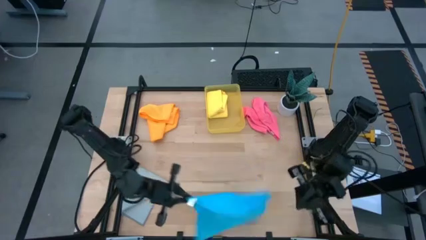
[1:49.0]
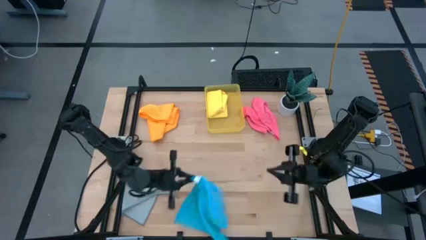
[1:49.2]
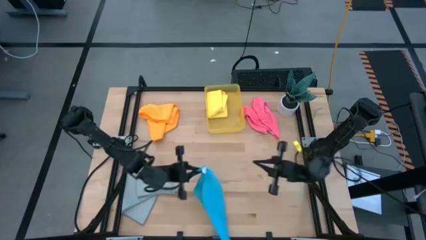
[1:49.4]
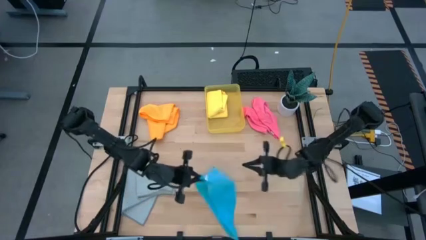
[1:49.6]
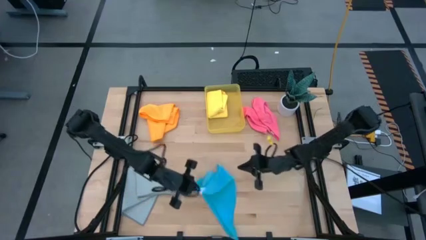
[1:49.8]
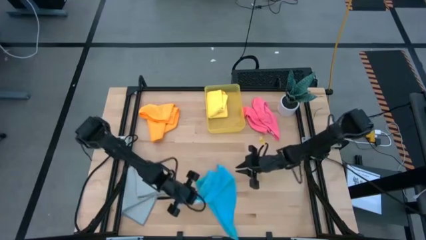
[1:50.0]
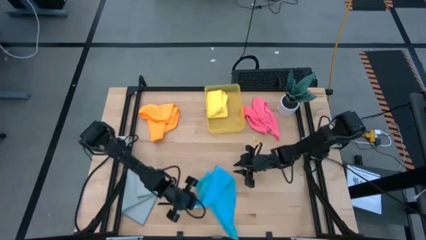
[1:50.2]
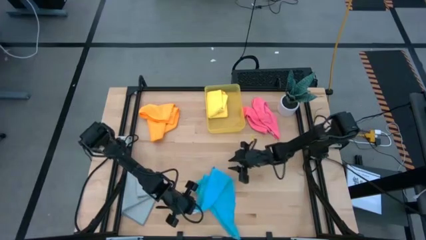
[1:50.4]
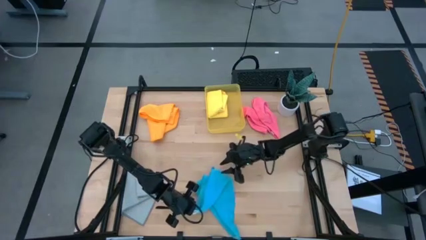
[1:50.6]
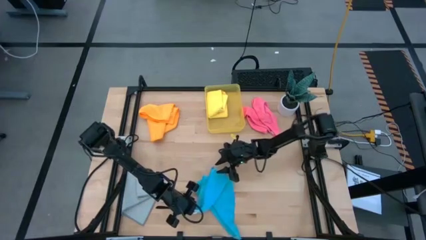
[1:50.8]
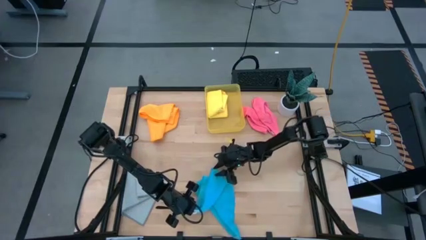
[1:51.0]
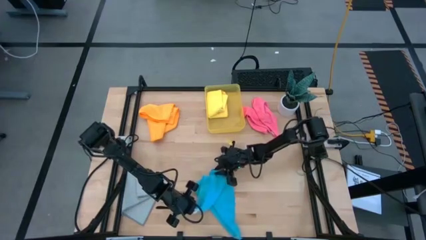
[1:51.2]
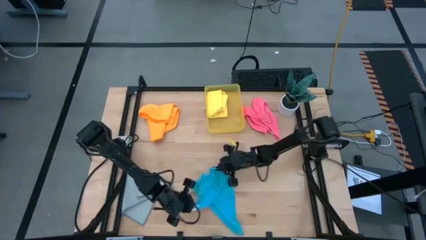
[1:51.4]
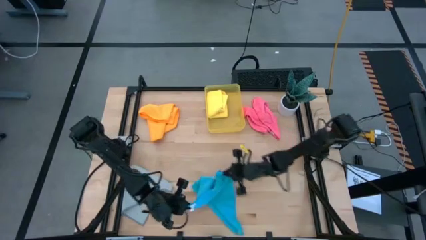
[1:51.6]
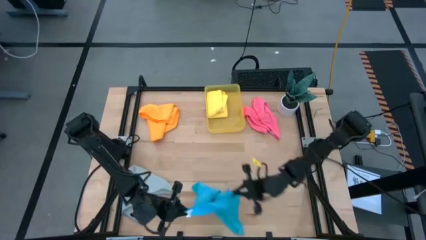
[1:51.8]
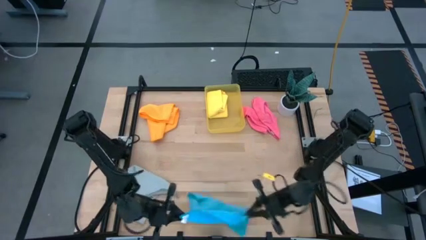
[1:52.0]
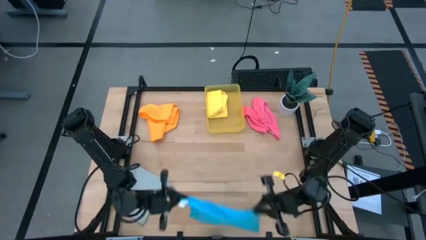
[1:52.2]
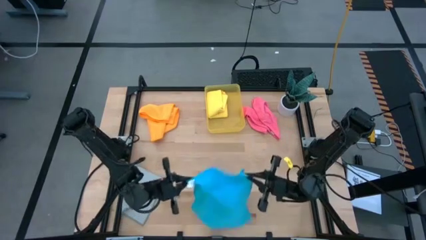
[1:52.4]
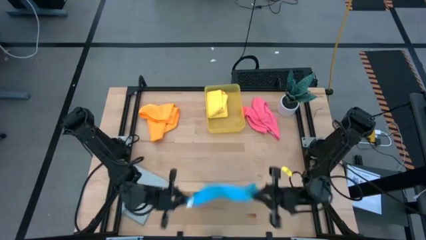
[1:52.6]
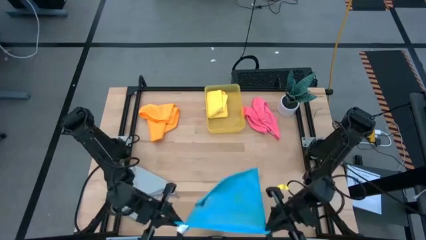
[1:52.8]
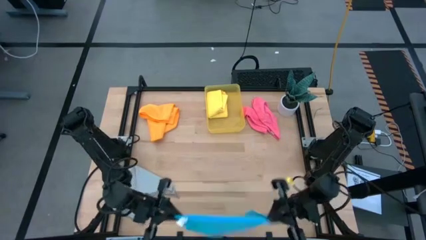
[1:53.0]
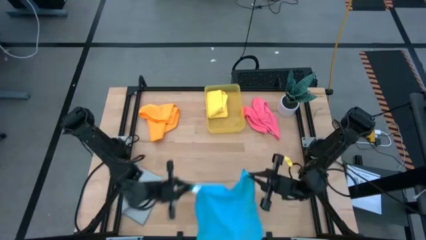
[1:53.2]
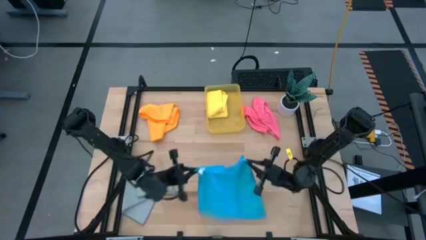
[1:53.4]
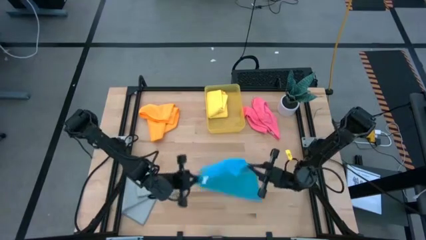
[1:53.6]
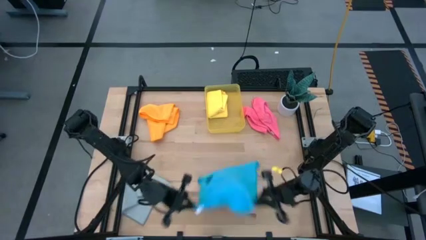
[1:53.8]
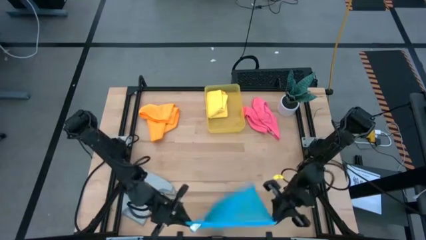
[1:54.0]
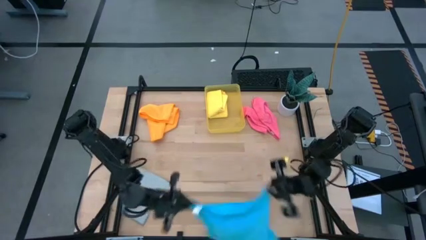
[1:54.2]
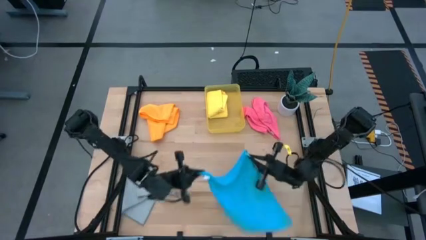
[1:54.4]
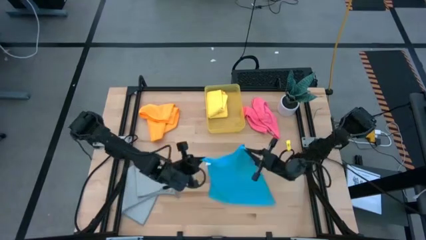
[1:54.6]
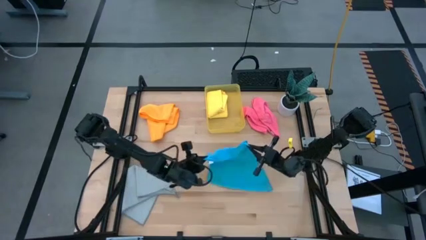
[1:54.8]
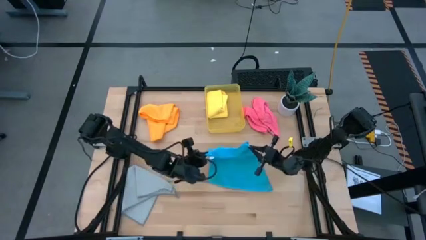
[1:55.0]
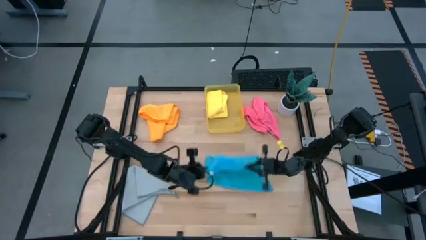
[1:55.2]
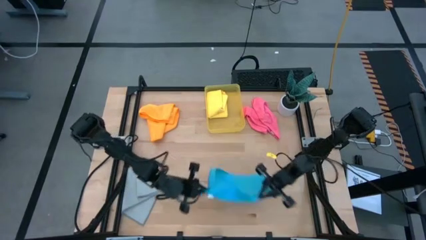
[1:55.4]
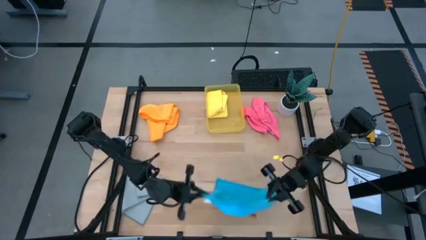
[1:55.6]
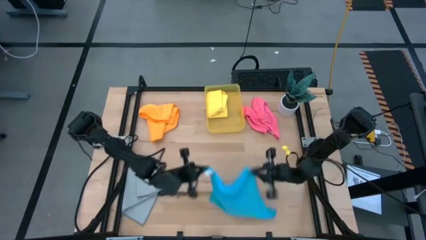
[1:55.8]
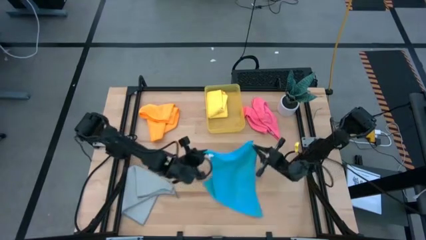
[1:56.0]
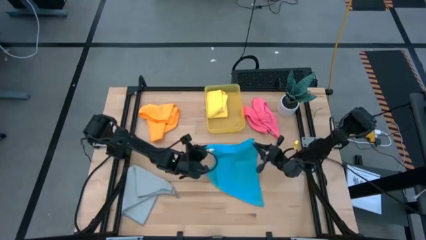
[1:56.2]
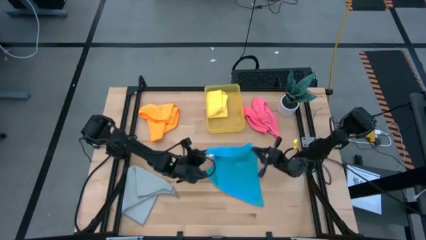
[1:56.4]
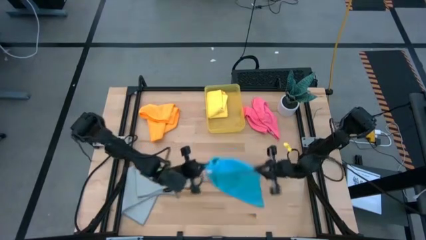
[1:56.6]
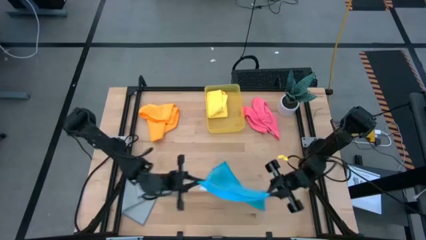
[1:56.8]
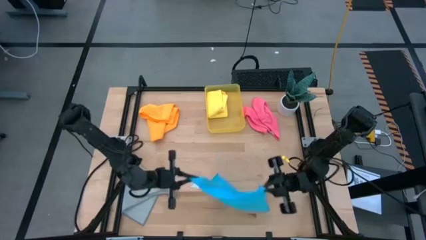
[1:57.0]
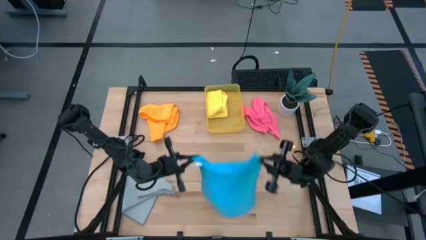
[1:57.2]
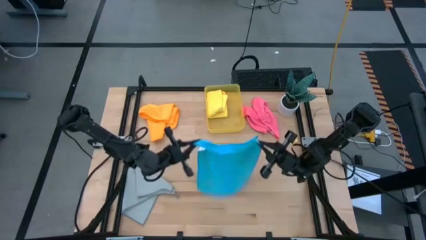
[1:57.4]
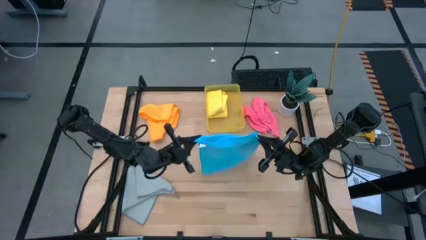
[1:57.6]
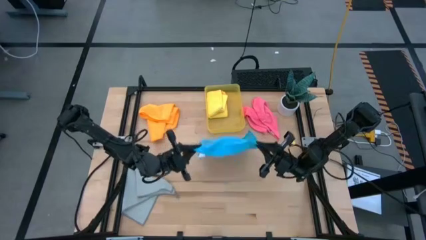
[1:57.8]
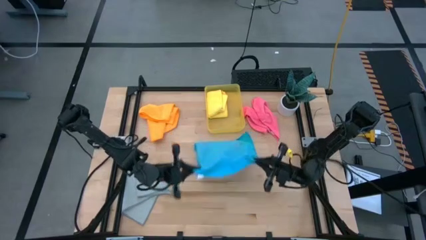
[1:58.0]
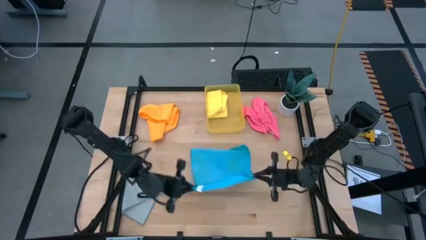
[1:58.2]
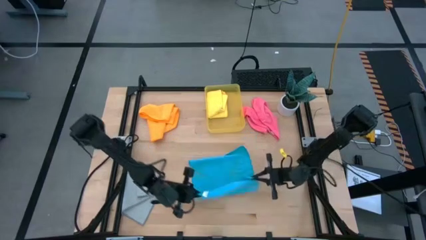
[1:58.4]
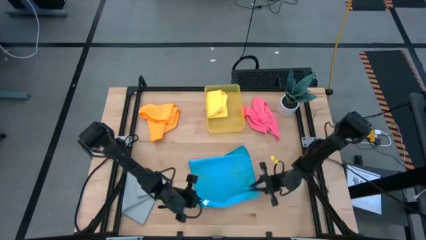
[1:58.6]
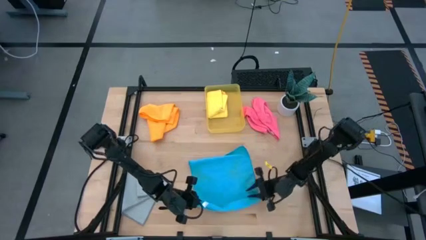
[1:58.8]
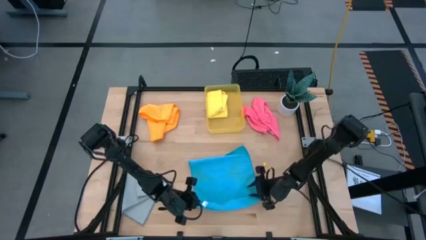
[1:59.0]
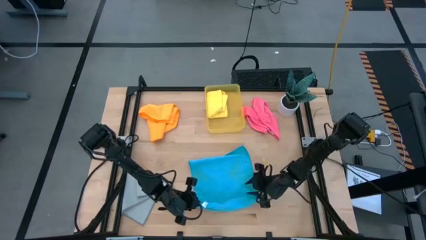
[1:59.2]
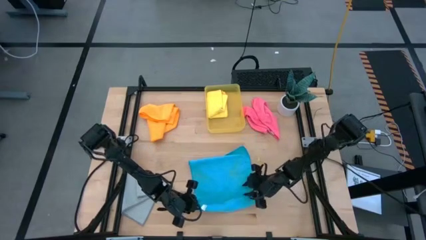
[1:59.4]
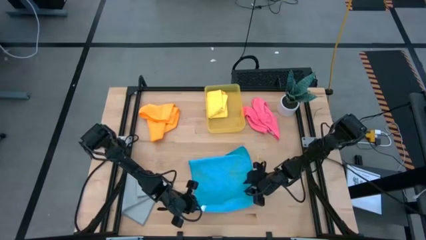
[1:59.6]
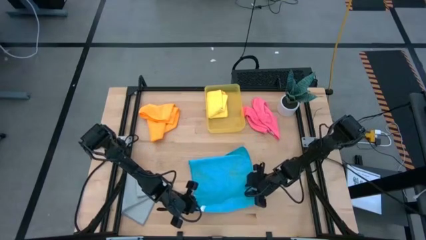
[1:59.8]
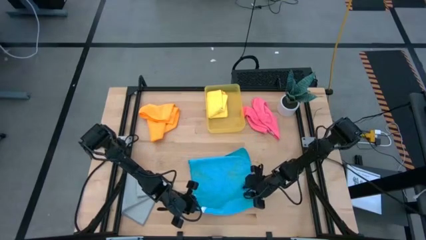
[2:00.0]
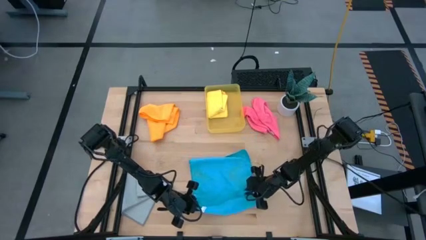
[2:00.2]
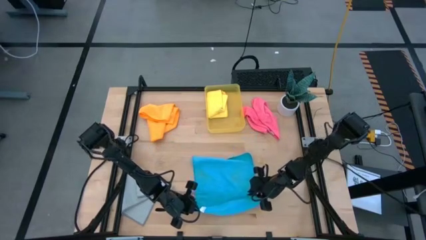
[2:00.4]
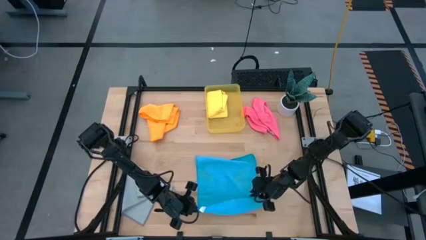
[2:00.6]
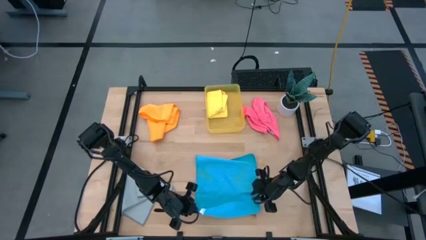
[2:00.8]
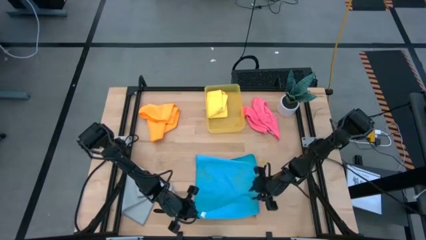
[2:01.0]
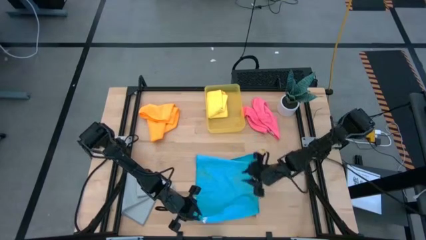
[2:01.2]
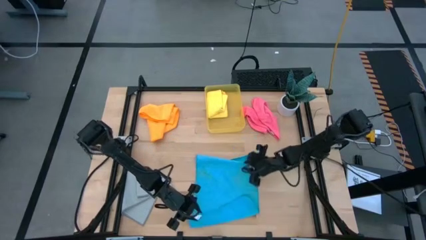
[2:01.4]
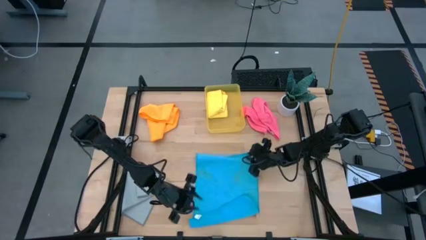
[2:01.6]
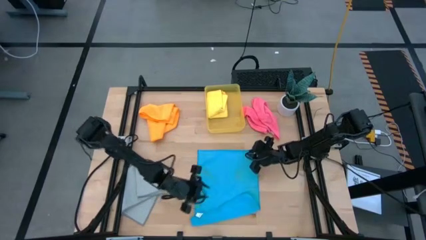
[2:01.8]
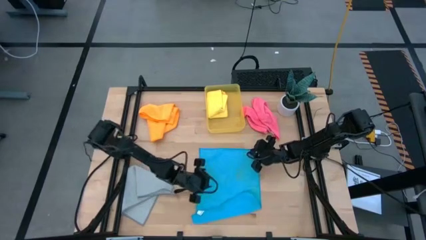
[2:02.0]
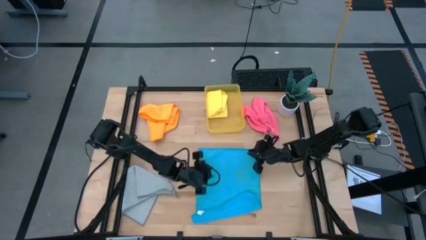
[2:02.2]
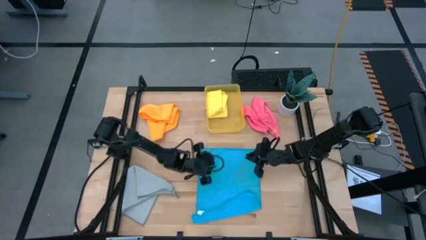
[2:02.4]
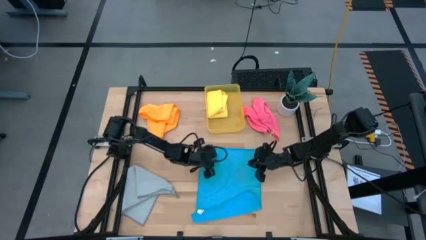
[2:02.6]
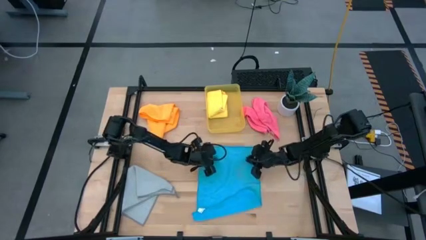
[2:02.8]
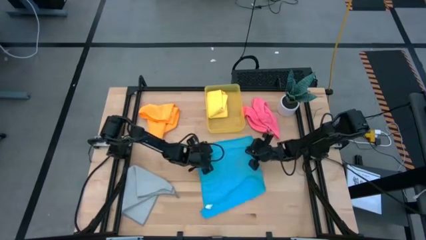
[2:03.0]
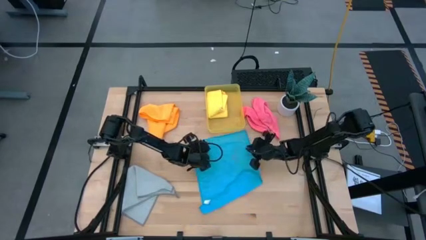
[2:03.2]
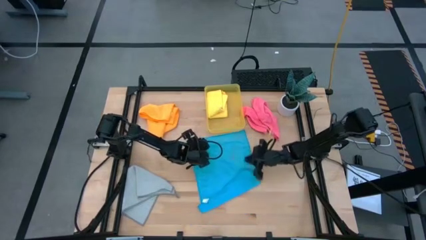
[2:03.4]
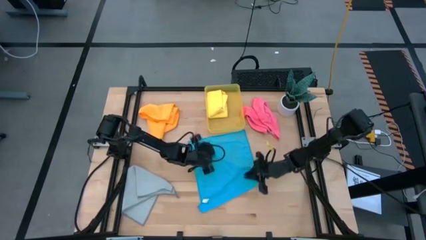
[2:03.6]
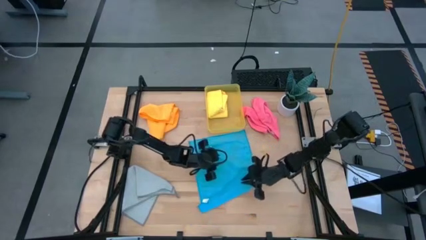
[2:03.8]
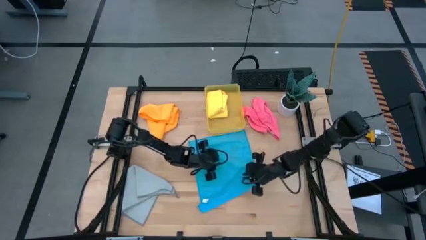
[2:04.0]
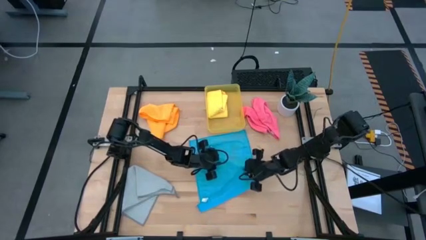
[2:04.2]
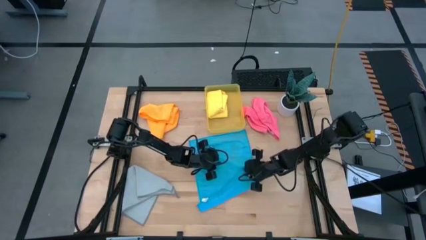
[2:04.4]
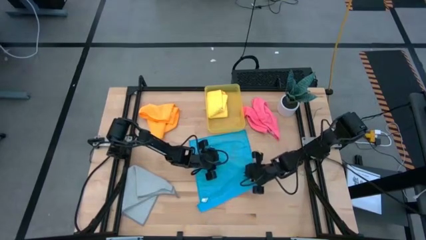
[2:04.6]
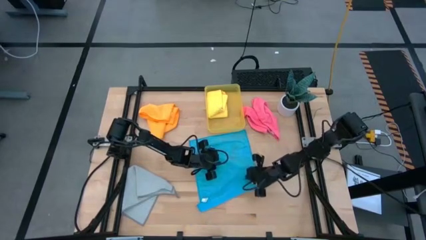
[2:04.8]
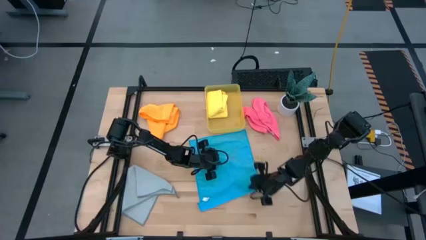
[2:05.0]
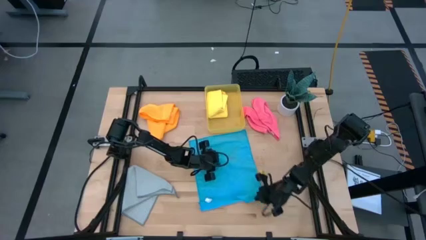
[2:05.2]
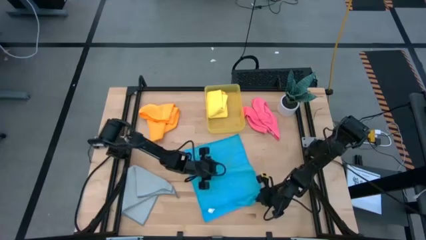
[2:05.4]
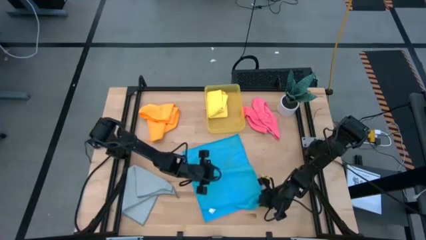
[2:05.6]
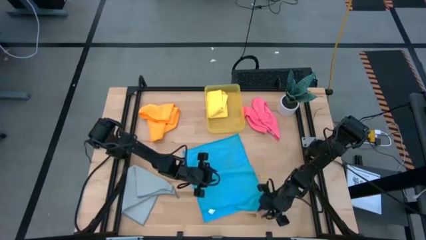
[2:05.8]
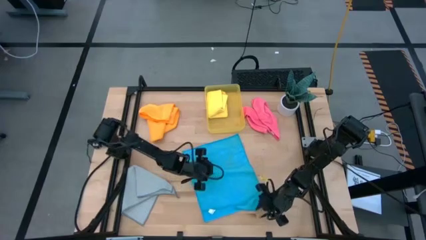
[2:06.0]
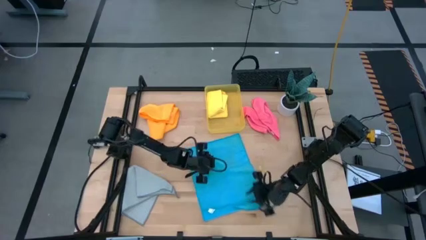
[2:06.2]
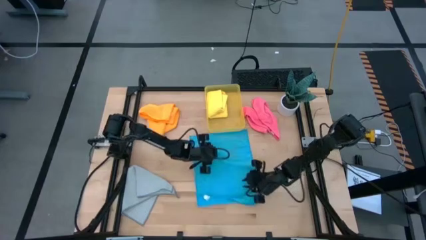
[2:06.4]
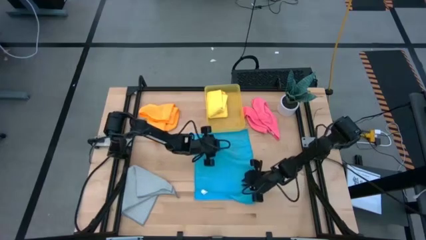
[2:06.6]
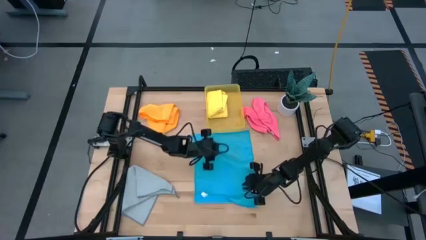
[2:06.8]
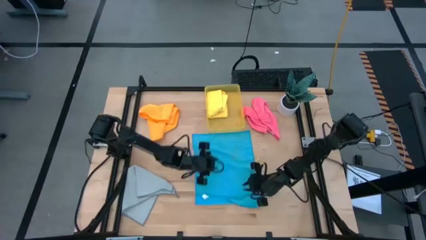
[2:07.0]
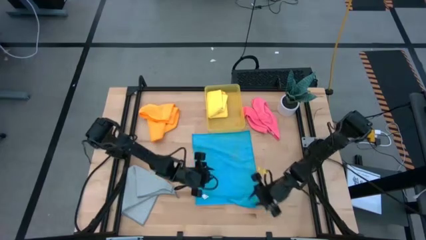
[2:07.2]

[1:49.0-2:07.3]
Task: Fold microfiber towels
Fold the blue microfiber towel
